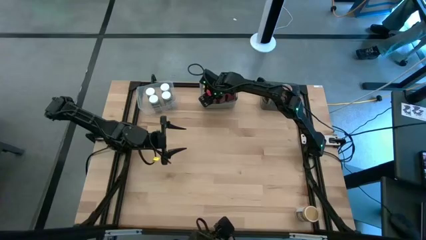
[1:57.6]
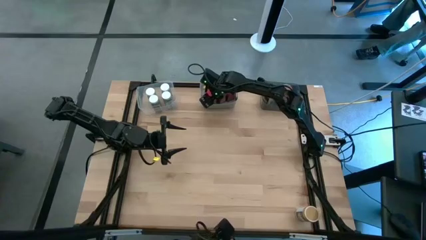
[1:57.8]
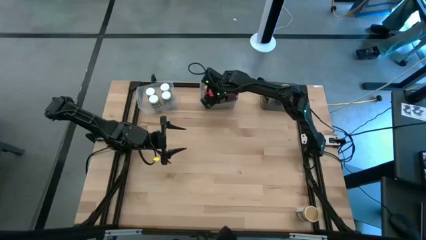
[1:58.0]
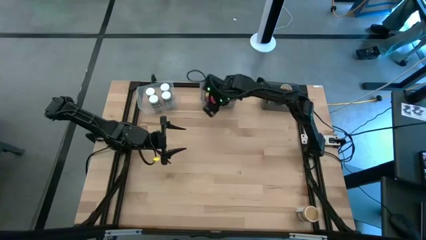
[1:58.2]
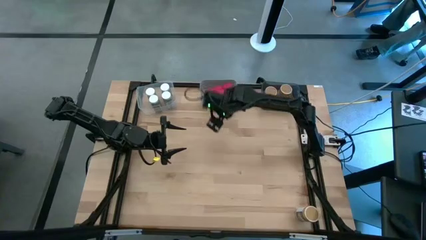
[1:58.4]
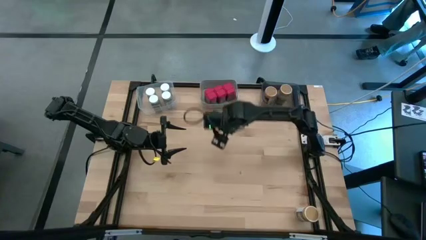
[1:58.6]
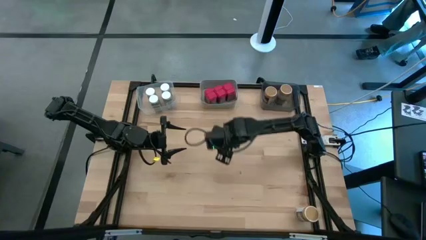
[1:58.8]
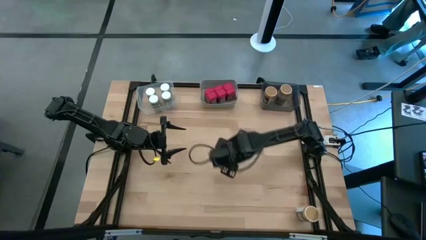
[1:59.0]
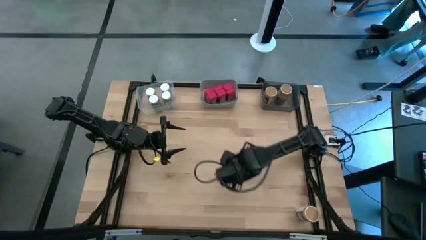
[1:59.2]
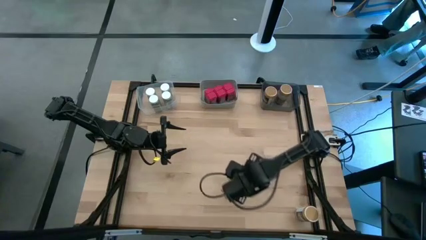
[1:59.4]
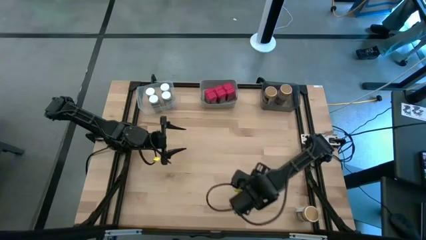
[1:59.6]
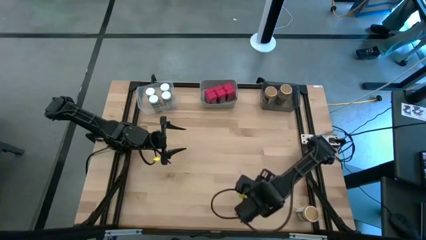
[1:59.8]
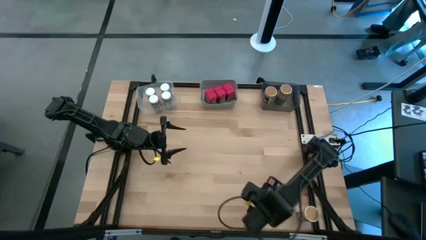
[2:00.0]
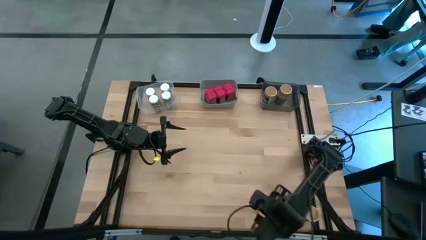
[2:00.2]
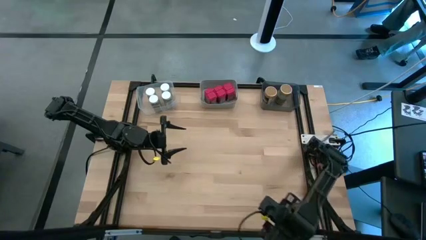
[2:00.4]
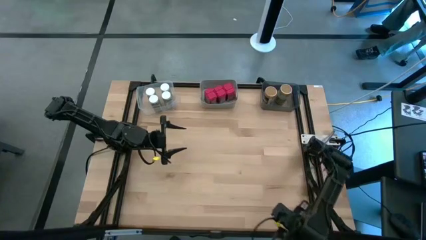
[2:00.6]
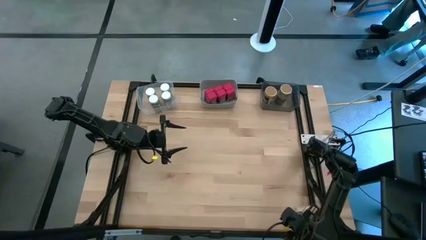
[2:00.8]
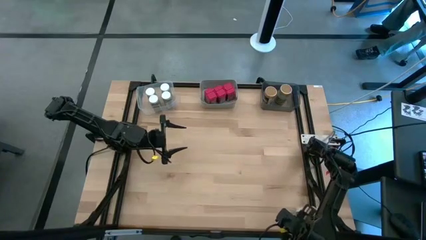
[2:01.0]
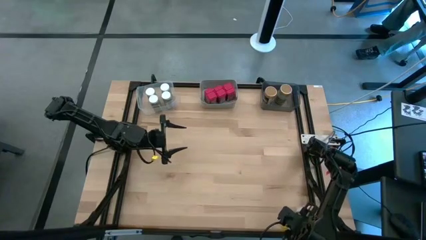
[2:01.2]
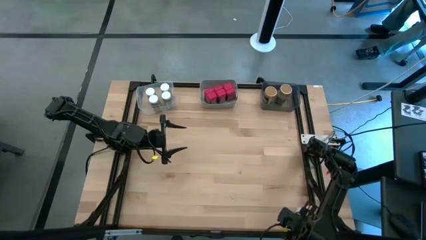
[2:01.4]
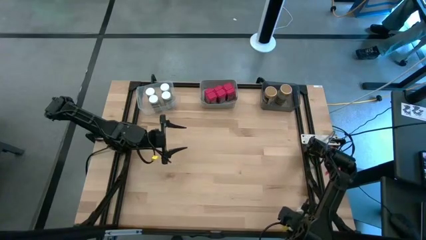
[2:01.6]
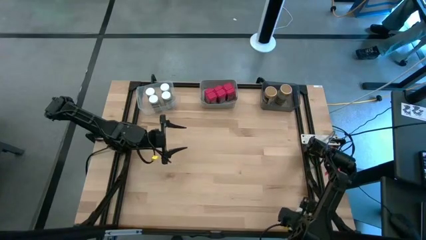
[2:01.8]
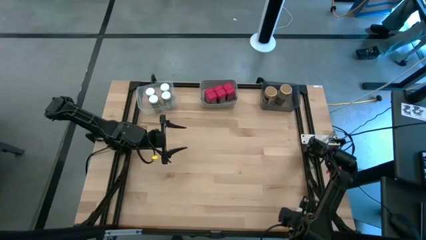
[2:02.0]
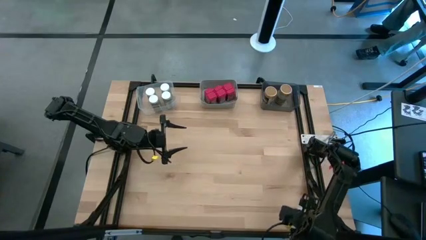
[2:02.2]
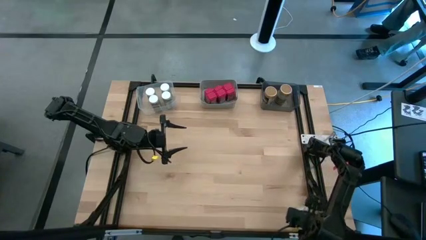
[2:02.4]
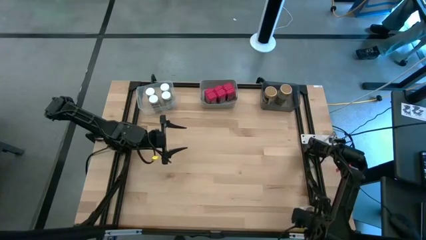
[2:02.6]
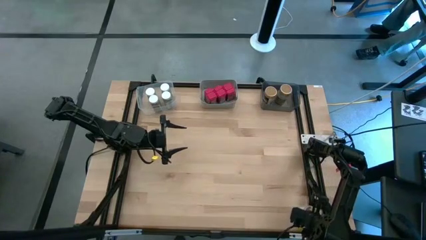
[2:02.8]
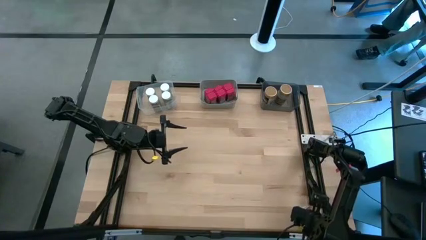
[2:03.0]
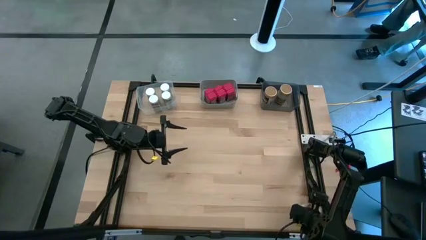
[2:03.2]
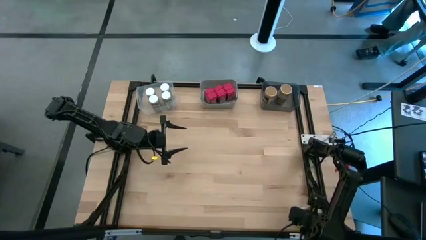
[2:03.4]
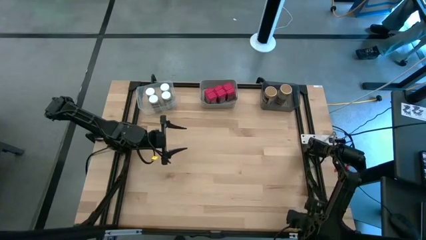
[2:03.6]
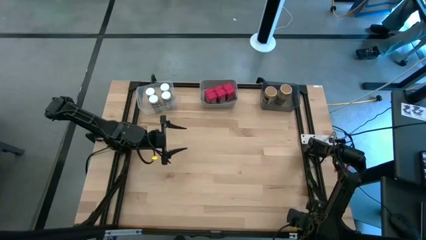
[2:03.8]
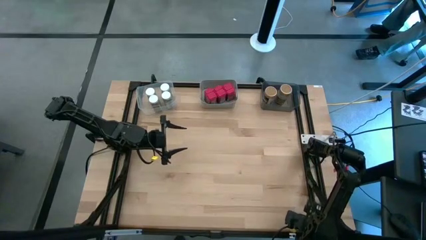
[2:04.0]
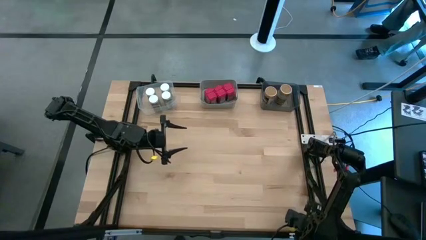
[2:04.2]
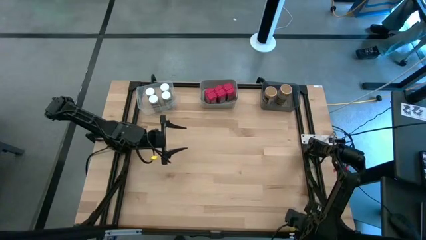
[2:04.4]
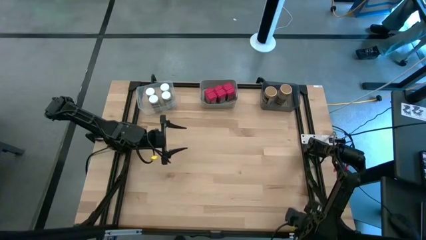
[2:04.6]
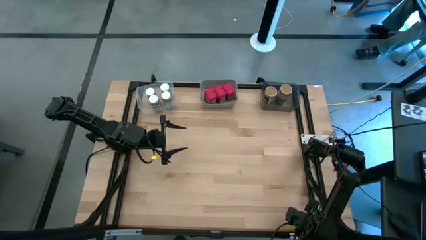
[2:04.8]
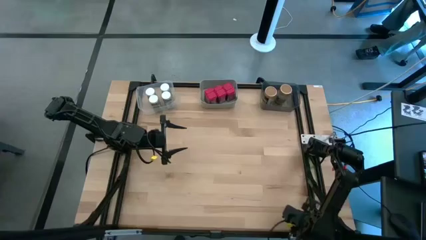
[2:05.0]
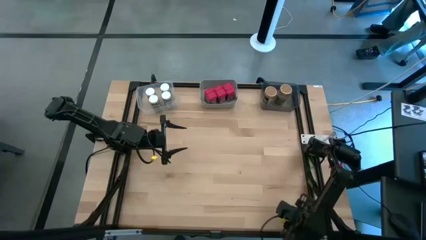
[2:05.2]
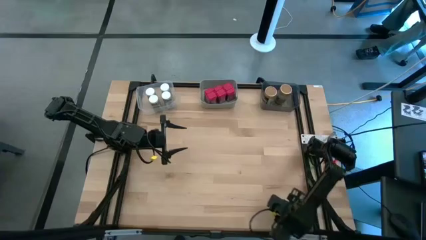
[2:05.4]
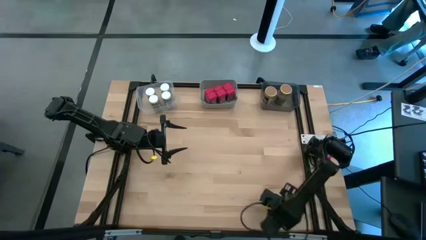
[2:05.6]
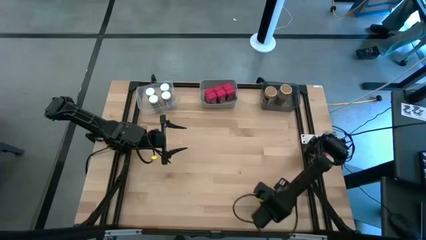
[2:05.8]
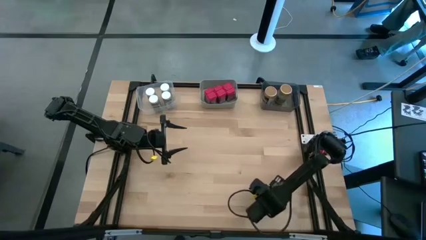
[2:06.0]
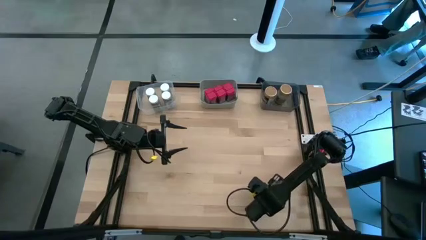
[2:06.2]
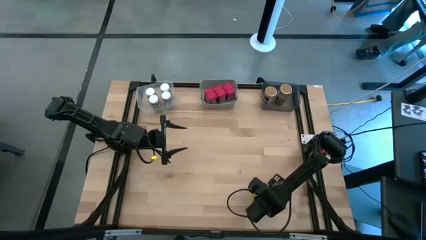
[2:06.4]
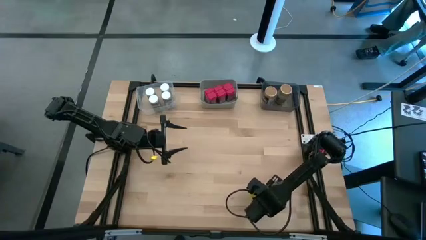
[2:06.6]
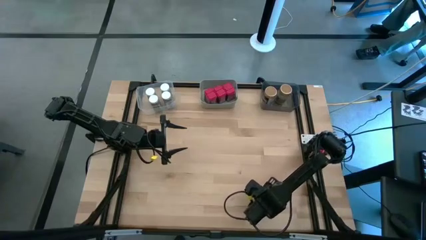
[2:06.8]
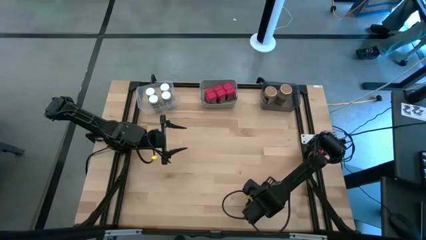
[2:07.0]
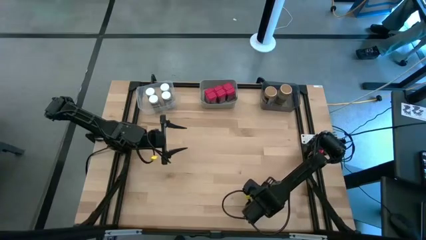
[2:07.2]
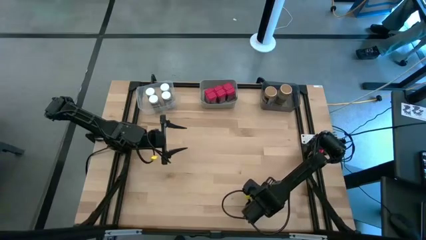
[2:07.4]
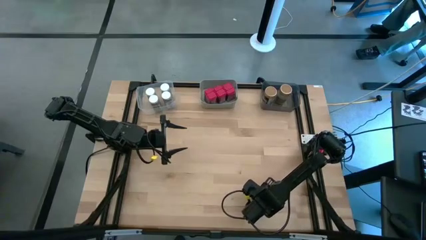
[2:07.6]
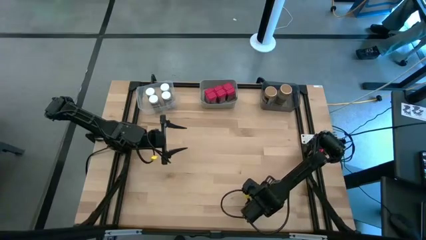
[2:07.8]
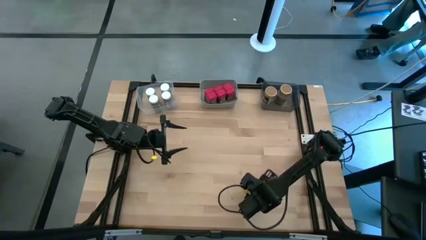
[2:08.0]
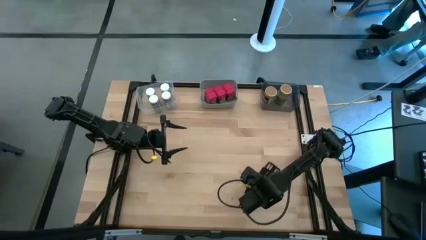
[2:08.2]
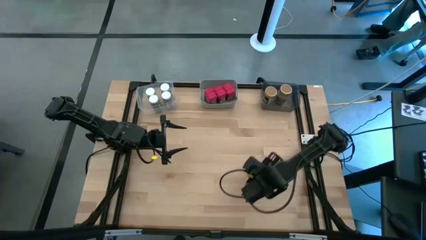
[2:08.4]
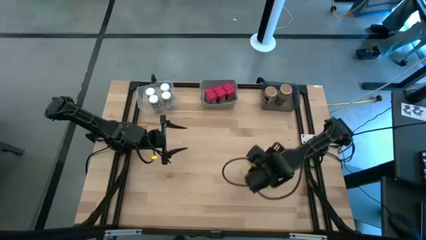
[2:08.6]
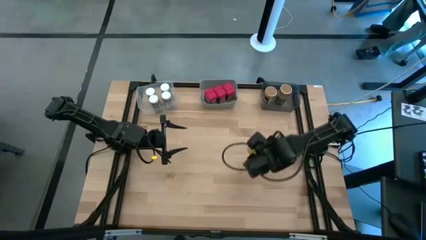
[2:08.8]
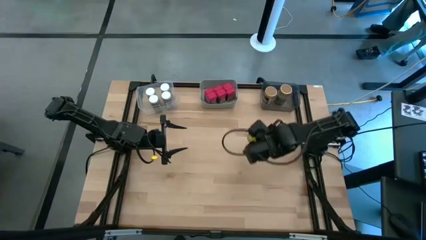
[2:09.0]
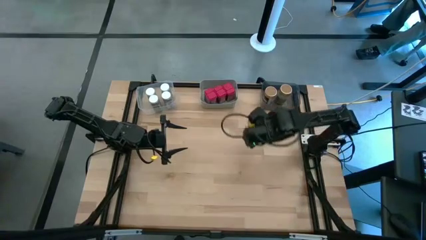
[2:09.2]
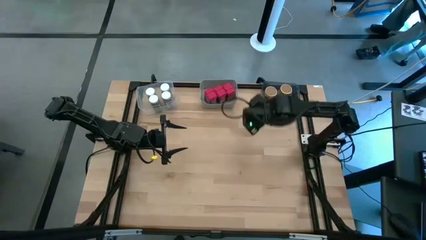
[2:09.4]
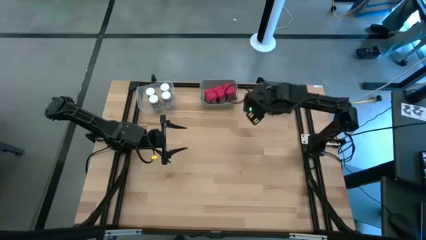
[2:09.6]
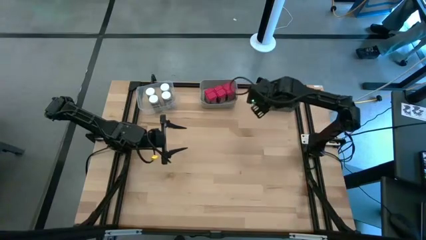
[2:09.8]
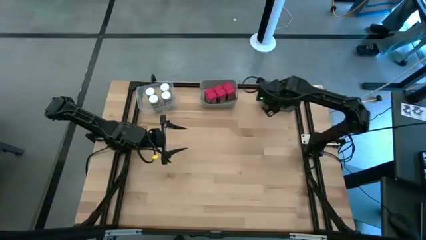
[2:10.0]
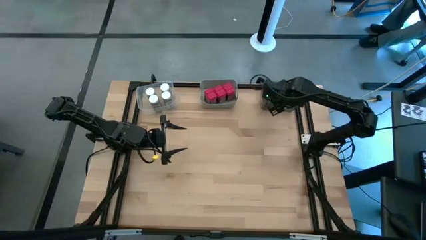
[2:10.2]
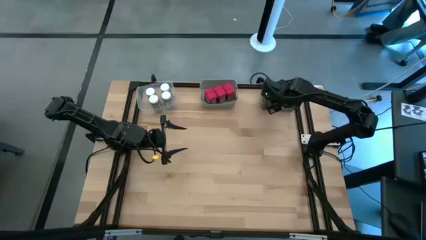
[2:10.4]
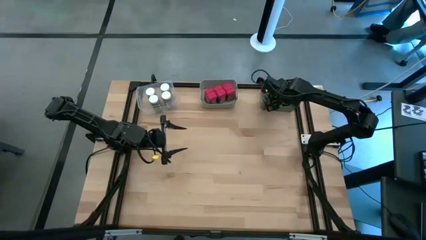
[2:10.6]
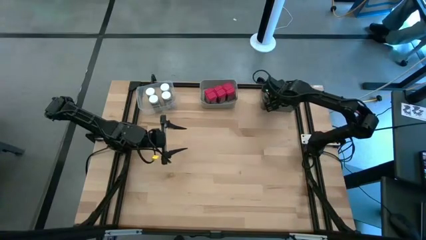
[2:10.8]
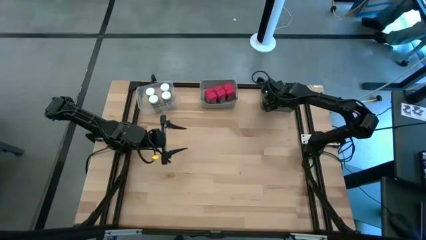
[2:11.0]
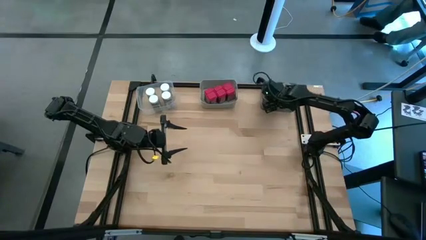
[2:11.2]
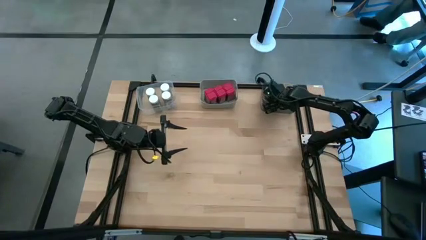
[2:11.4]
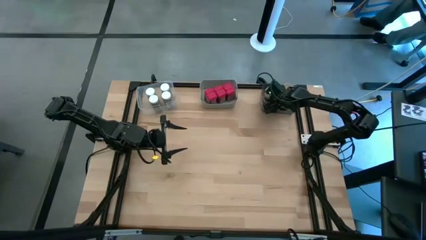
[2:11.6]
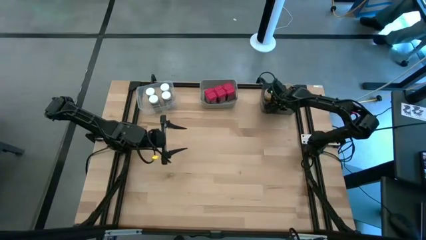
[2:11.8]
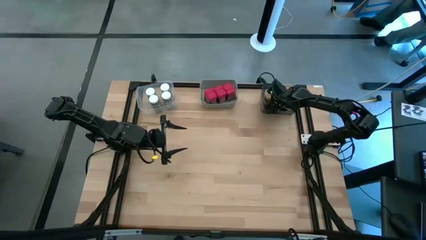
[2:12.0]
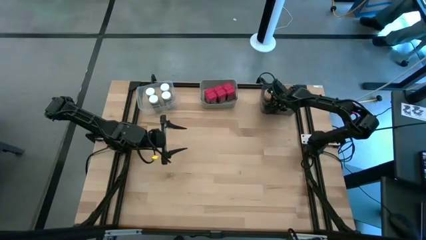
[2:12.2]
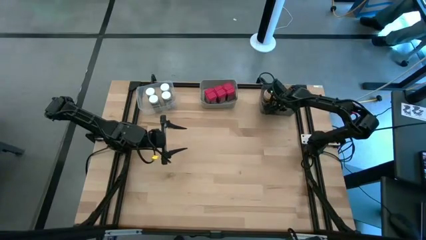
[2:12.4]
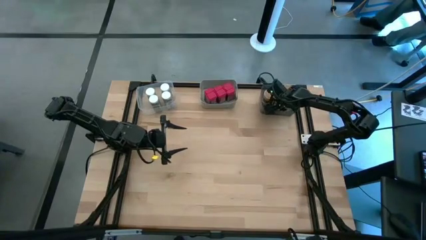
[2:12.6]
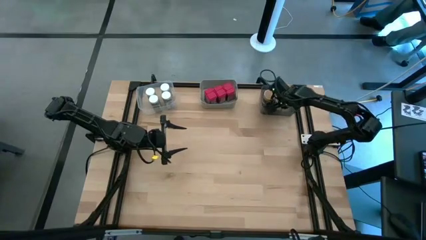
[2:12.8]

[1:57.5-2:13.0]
Task: Sort spices by type
Put the gold seasoning bottle into the black bin

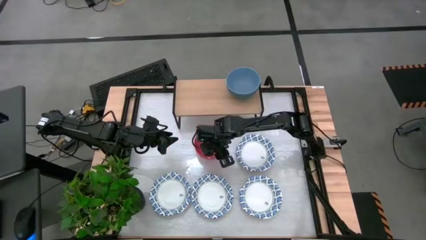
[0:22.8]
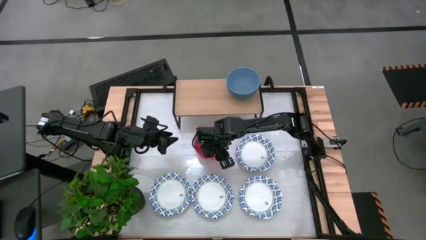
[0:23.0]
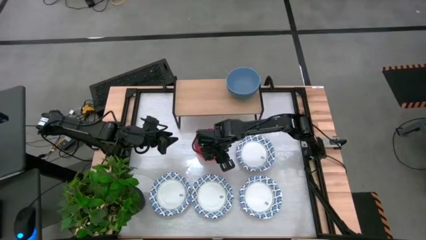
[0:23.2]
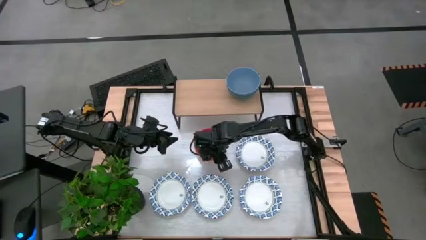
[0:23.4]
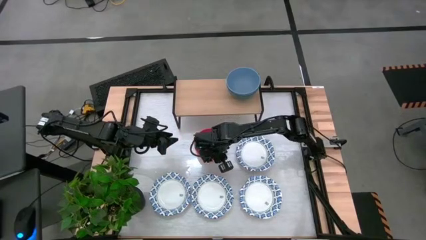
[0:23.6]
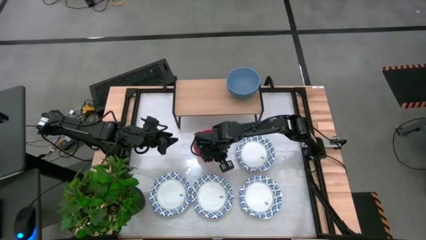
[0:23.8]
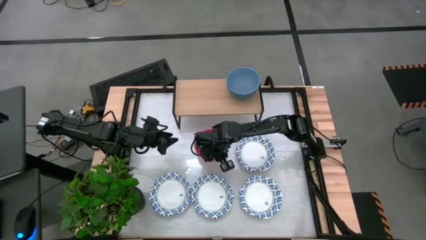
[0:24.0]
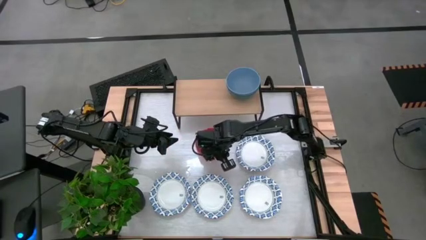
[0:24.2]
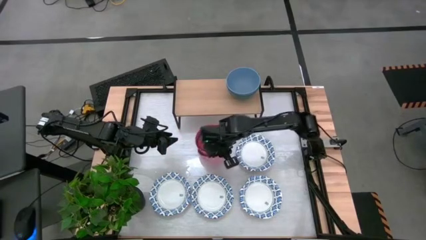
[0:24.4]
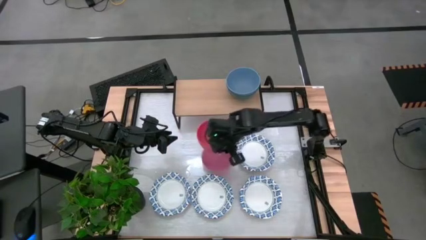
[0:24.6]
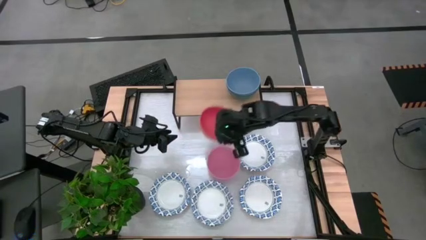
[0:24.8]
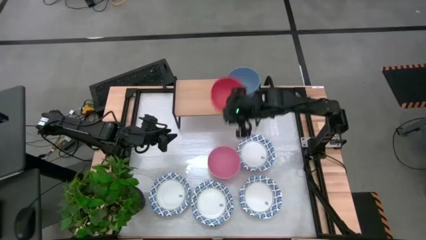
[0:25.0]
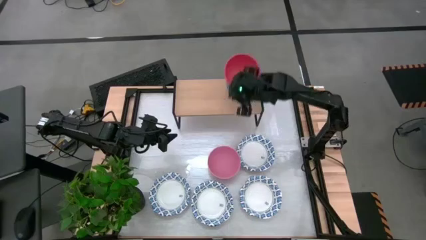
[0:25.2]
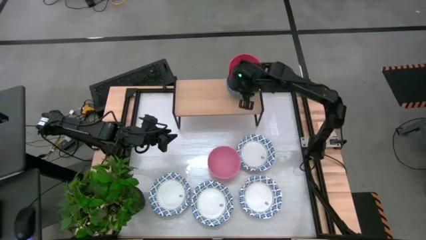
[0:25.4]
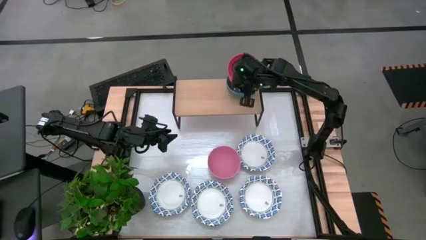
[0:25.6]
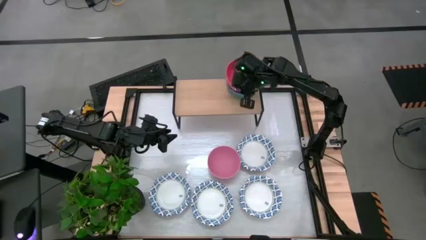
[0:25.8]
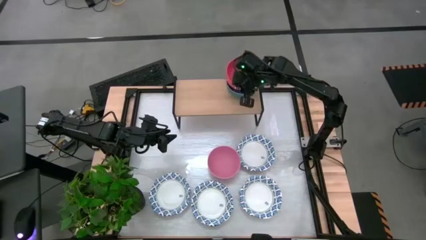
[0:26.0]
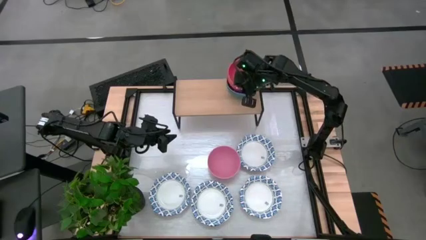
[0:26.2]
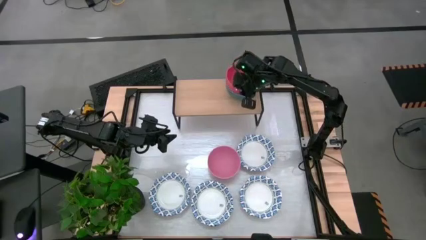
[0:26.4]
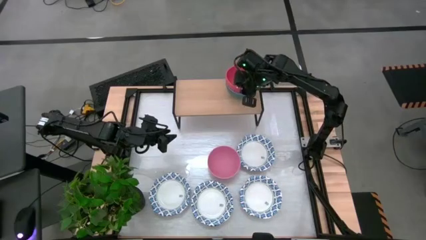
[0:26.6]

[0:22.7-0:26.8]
Task: Place and stack bowls onto a shelf
Stack the orange bowl on top of the blue bowl on the shelf
